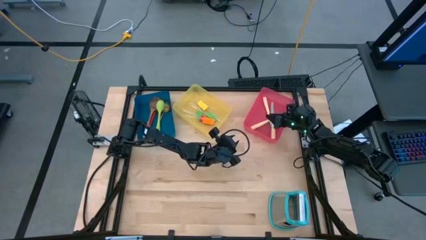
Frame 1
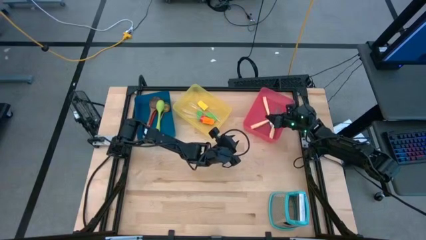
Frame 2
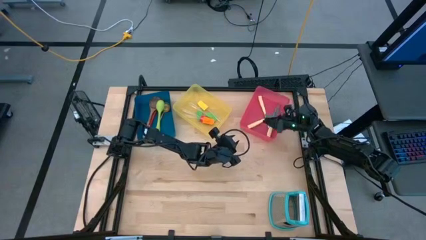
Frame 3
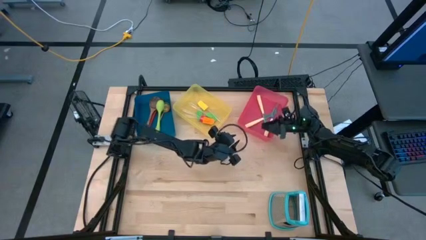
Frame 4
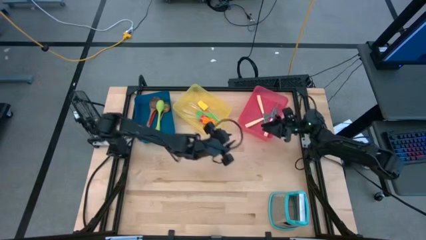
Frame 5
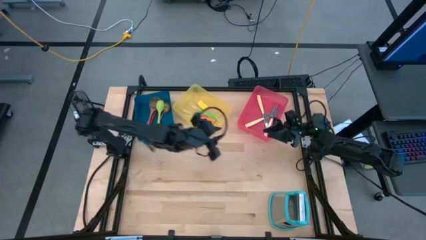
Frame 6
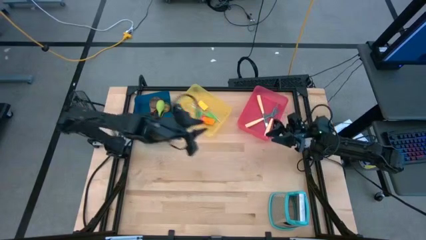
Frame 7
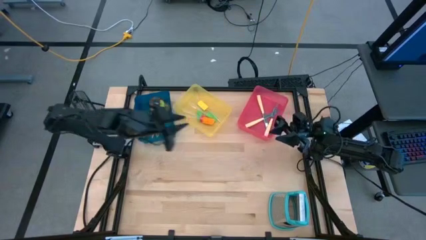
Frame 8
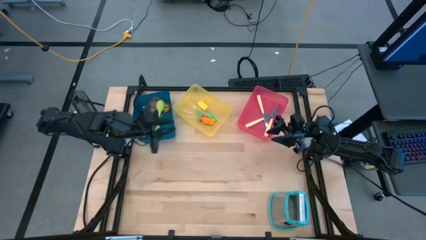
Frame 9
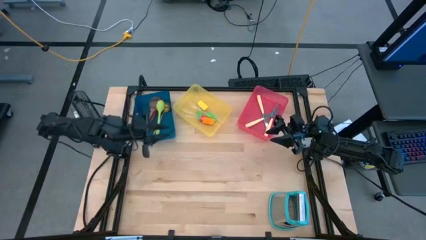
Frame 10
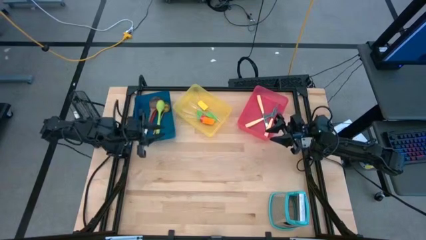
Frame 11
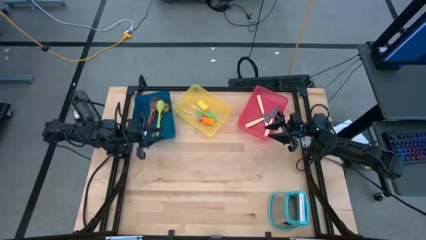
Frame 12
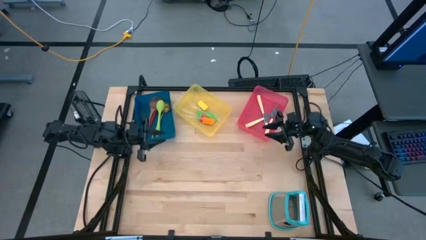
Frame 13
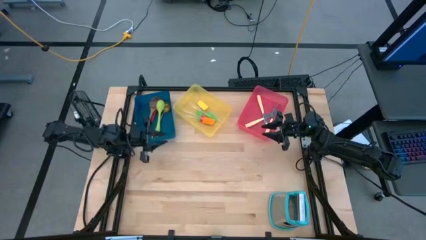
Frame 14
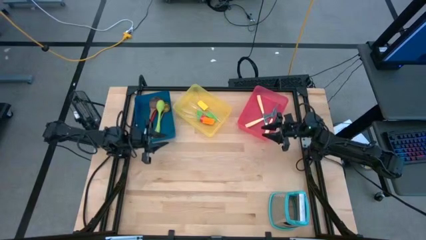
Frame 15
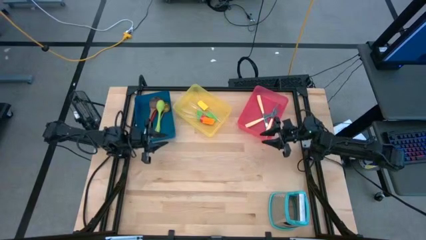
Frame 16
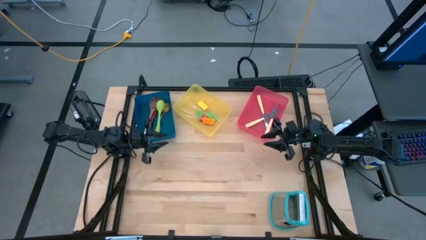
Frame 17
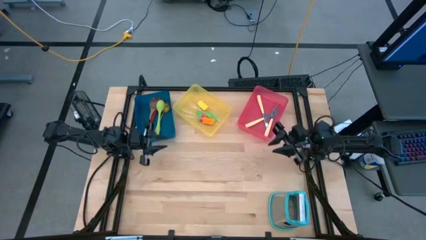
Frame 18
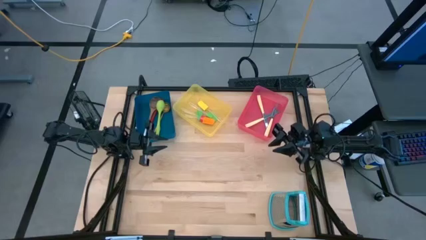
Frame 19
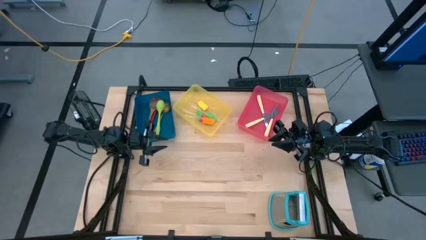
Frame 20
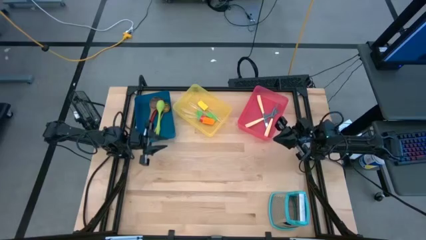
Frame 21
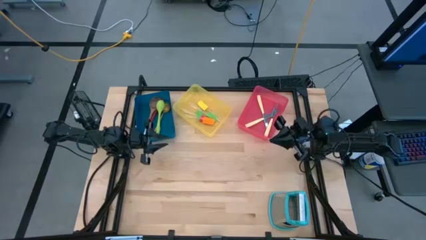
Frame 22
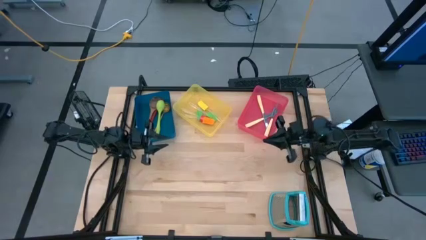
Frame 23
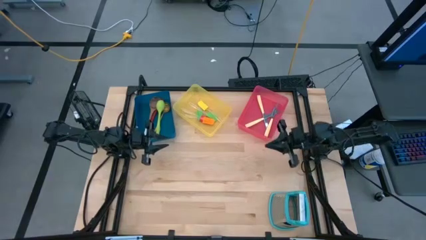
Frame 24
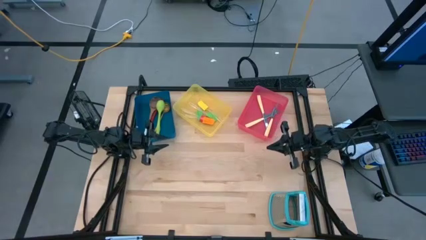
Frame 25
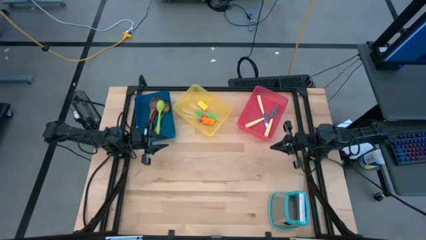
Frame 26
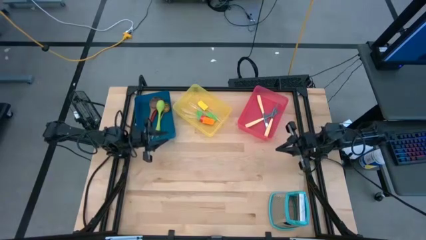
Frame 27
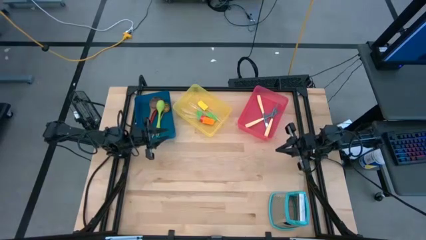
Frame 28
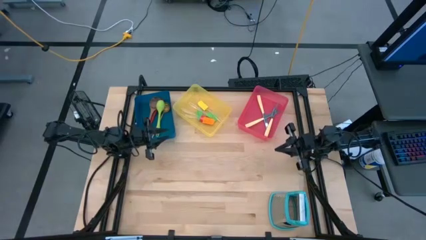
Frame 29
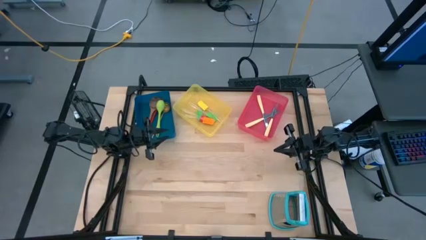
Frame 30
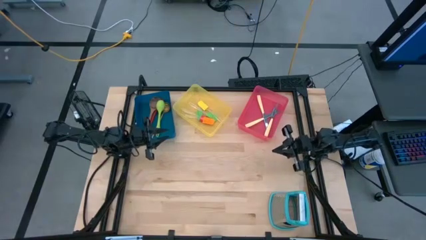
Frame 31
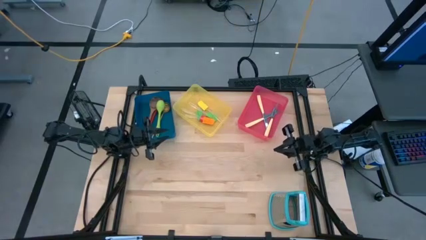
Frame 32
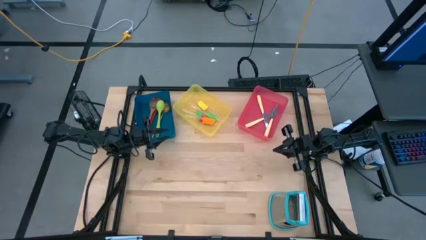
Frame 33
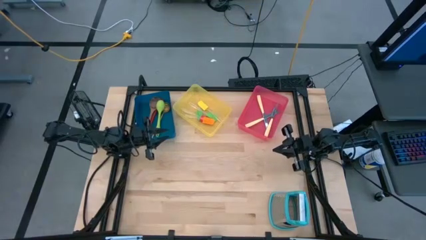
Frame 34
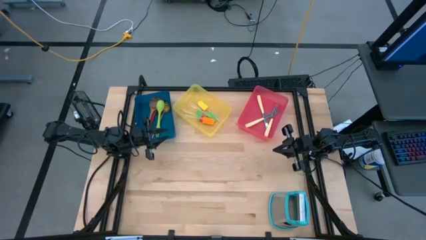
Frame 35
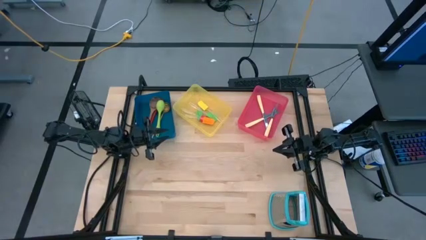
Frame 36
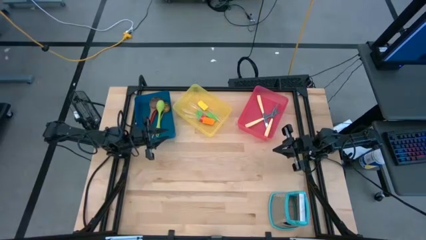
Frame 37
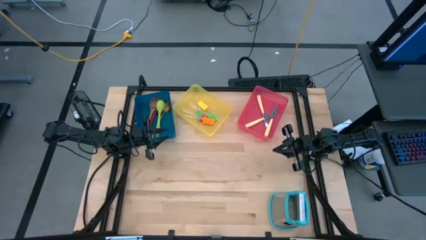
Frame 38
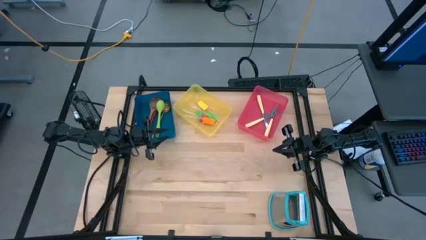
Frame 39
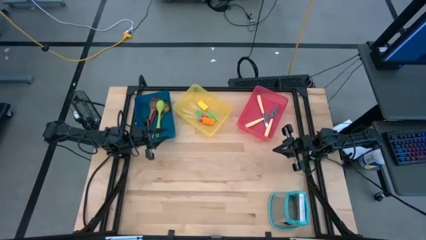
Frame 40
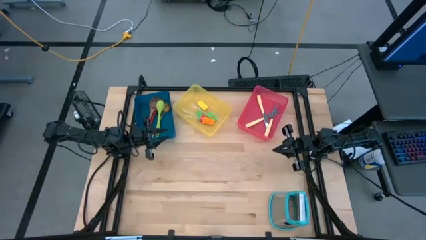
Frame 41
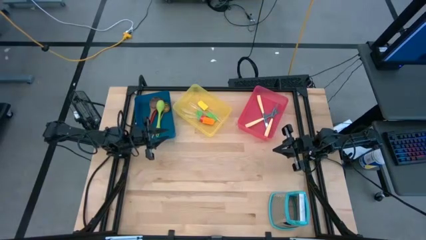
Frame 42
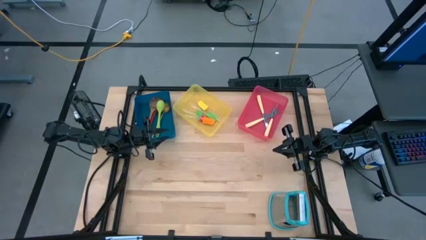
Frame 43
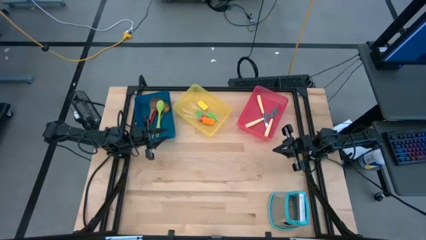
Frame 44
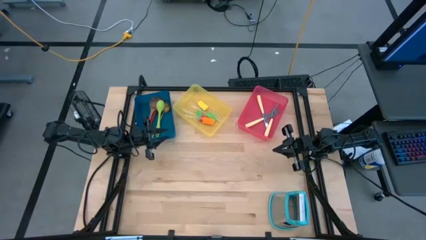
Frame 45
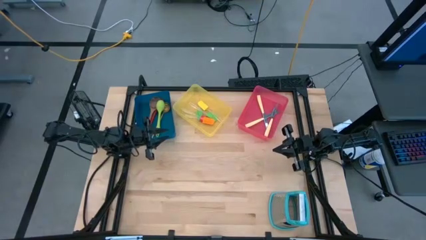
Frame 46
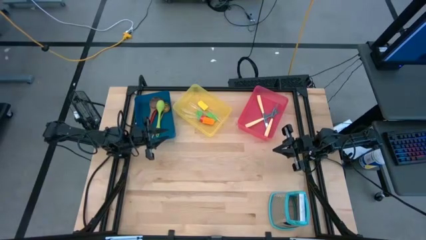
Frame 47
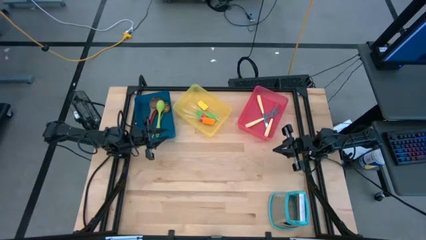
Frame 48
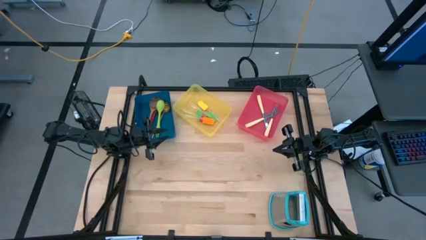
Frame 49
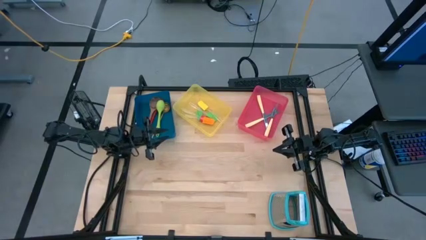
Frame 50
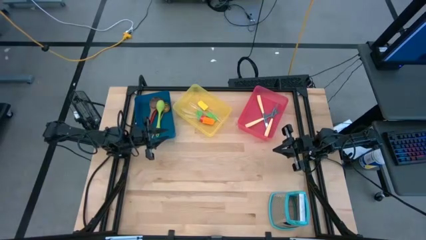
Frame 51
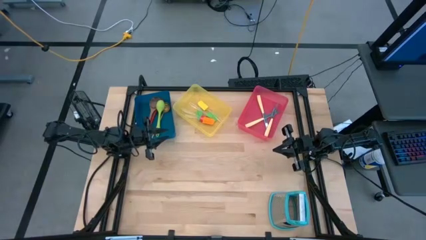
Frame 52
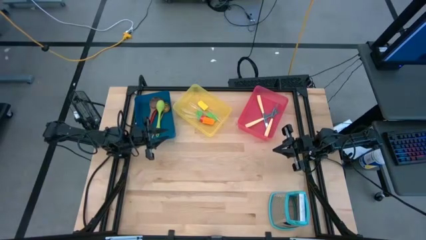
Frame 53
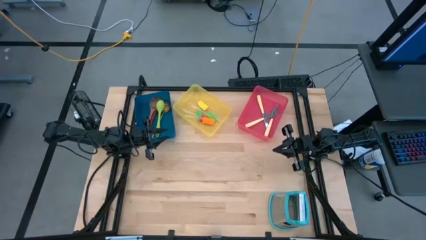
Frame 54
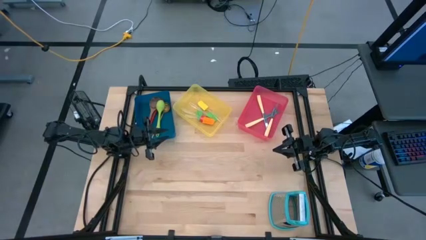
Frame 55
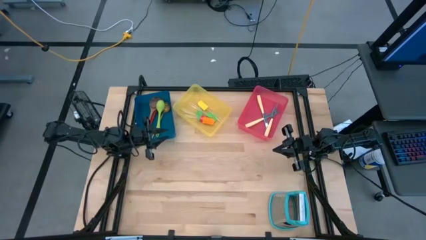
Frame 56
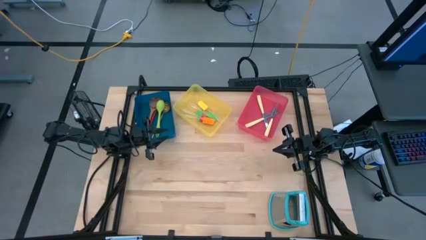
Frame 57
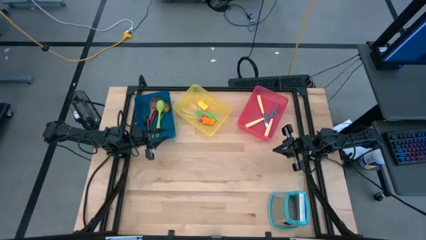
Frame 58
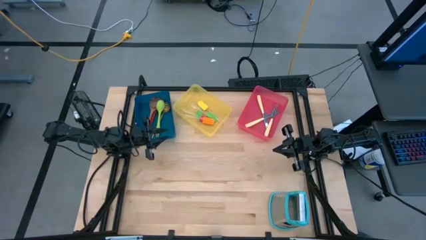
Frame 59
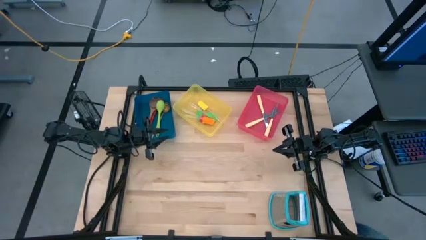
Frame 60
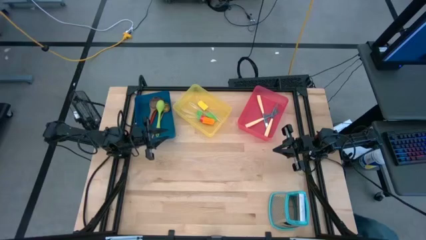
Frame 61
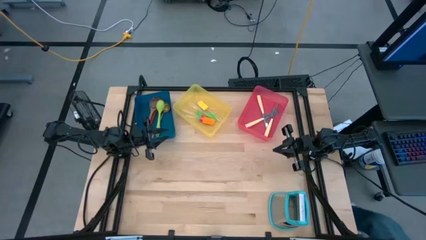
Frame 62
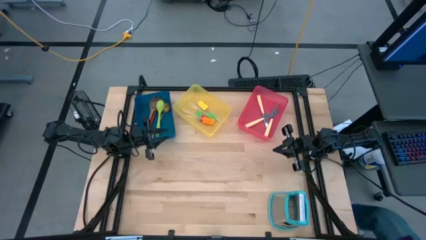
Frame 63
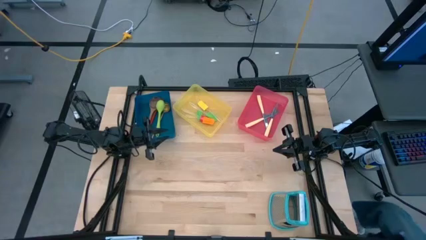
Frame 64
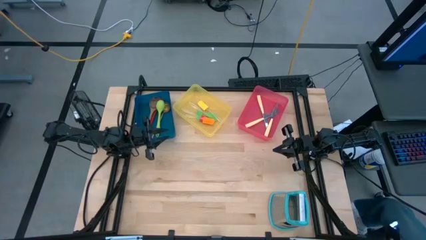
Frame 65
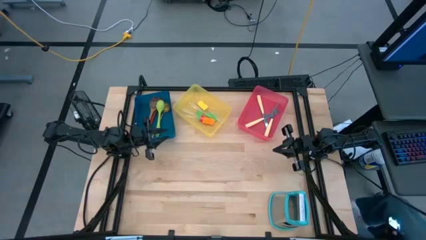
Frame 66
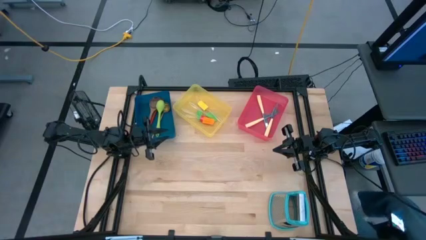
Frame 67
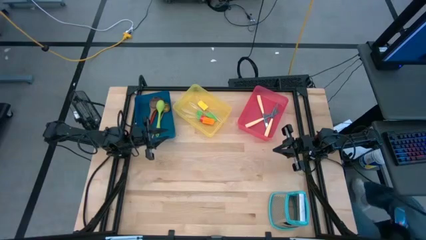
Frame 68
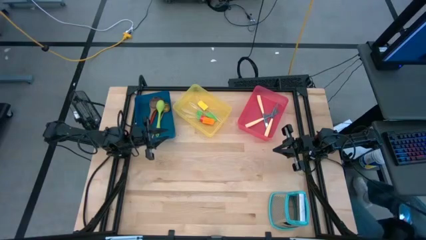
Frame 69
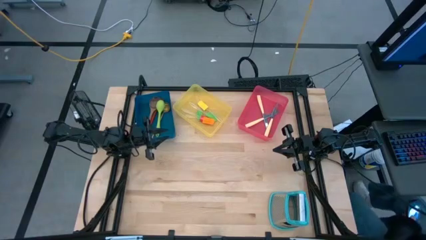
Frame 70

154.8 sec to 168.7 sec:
Task: Pick & Place Kitchen Items
Return to Home Position
